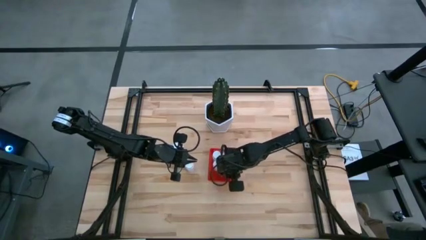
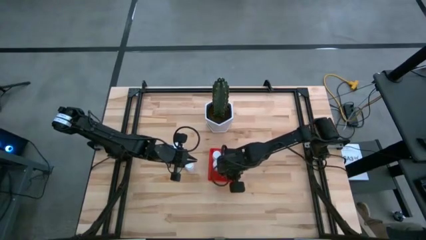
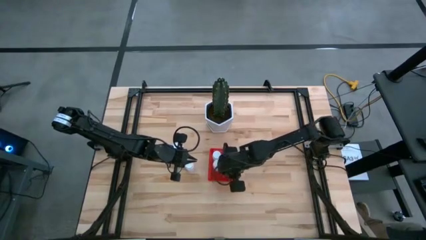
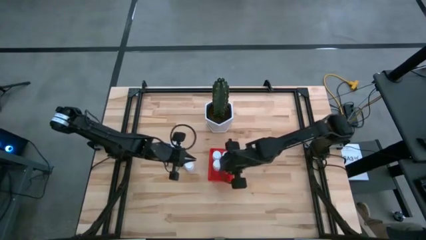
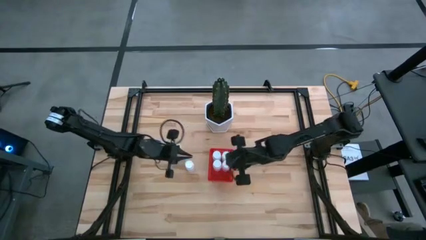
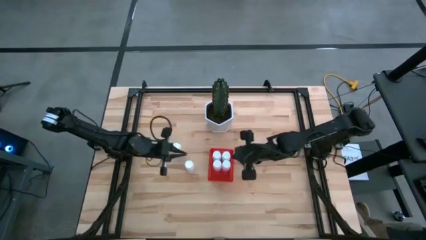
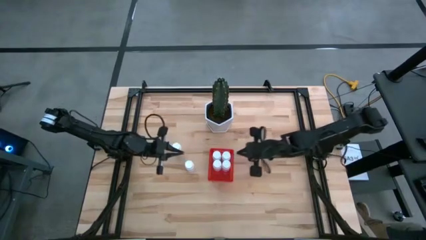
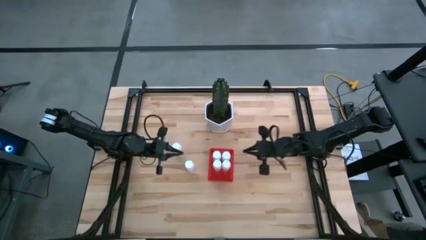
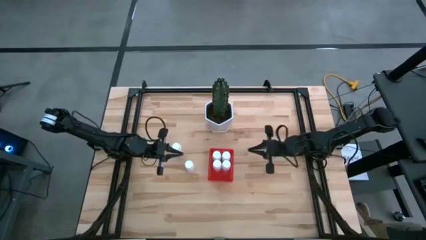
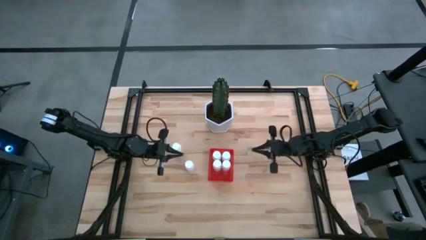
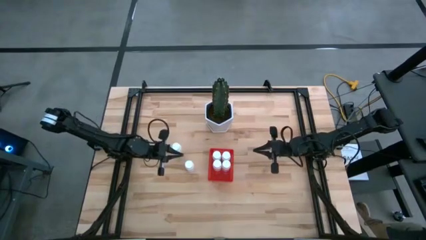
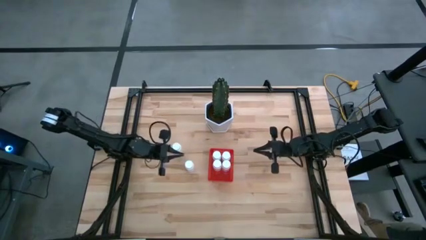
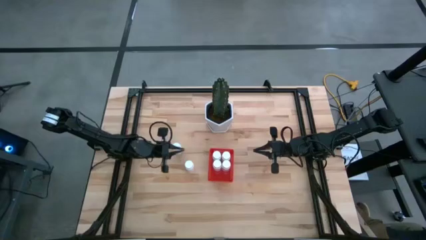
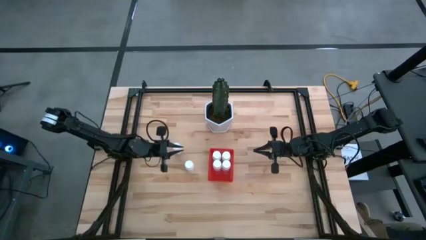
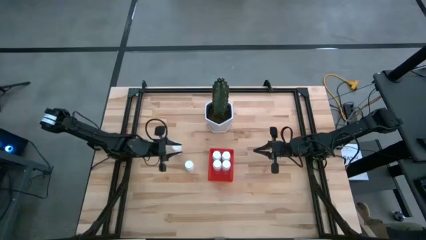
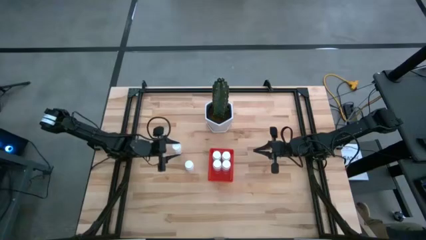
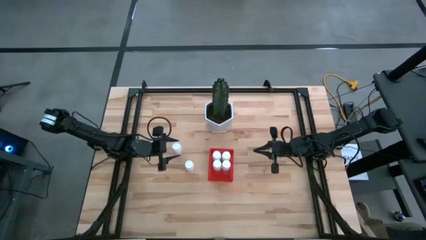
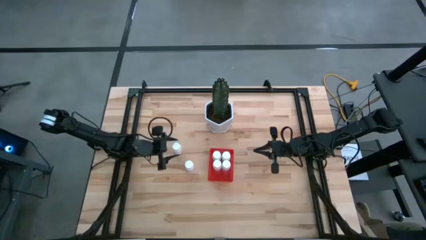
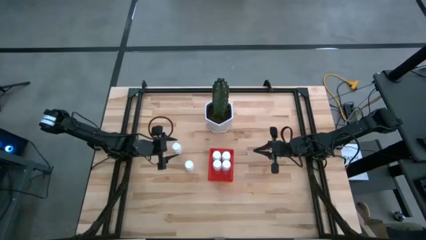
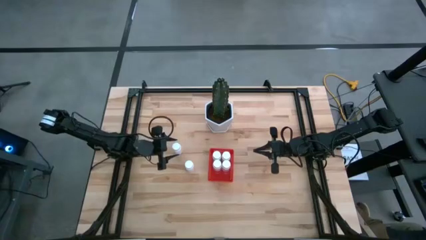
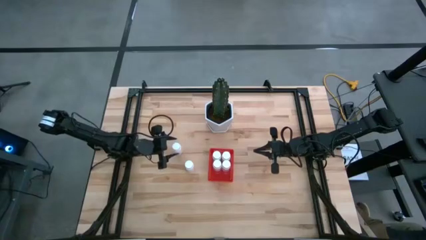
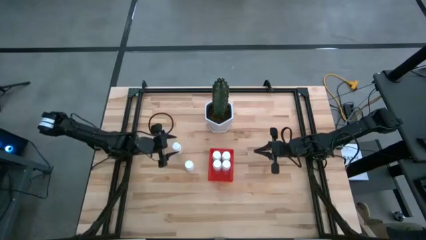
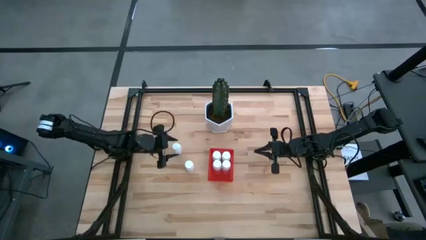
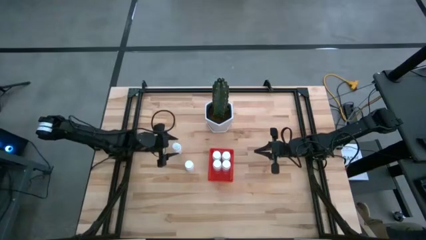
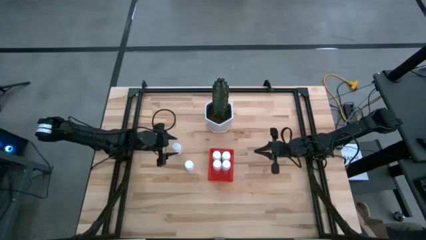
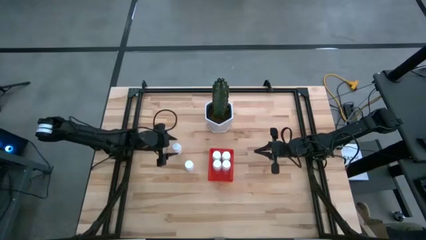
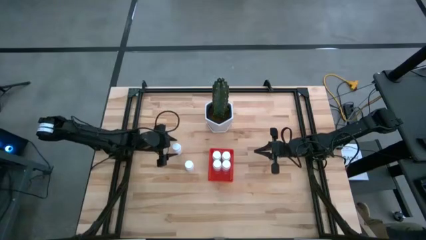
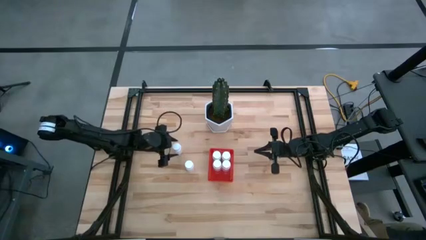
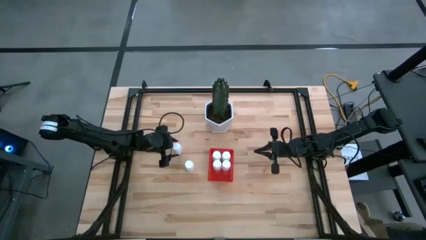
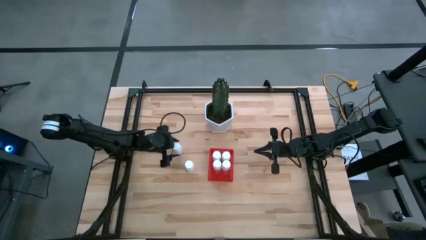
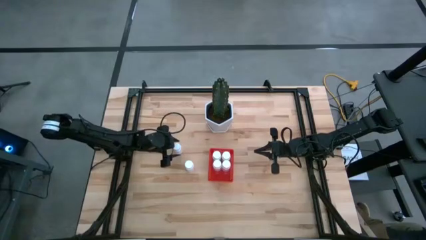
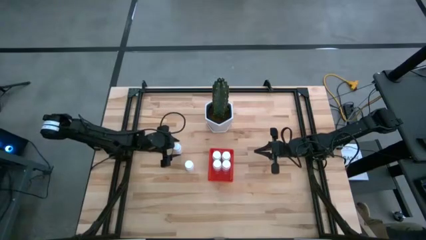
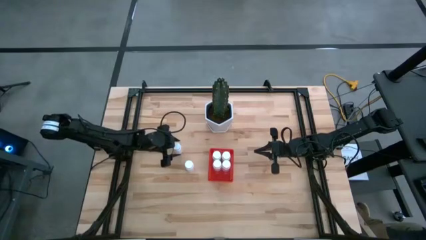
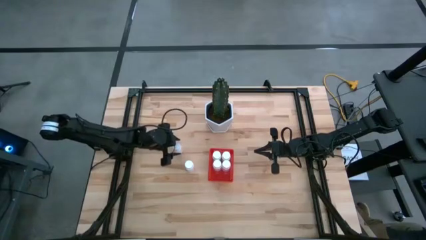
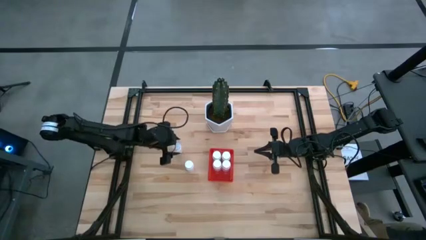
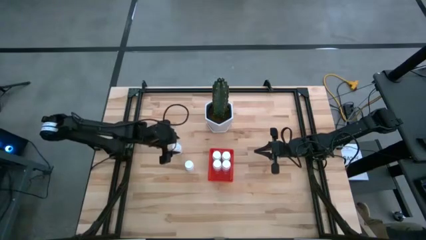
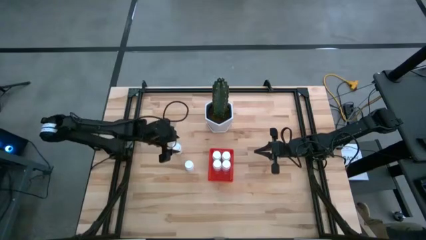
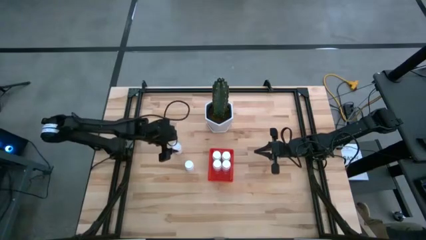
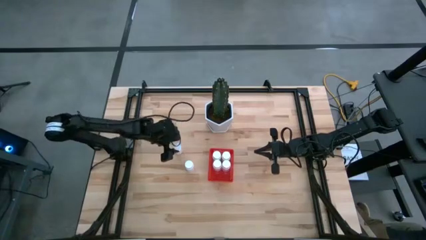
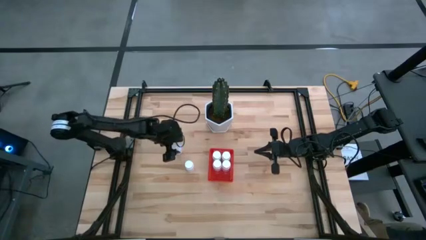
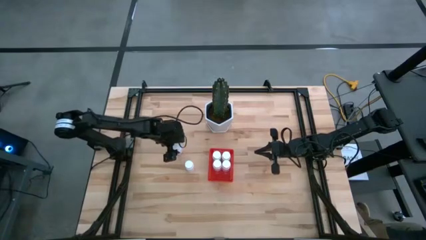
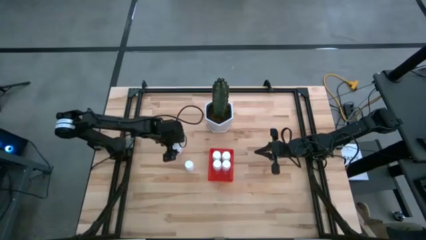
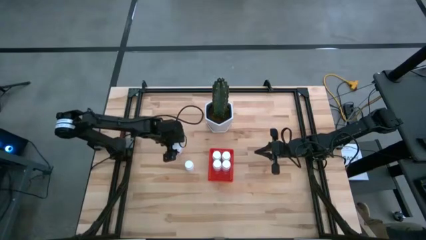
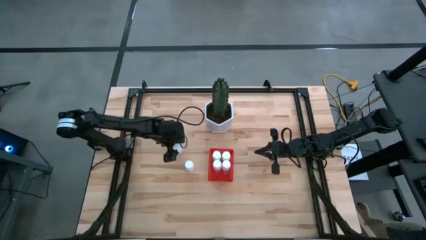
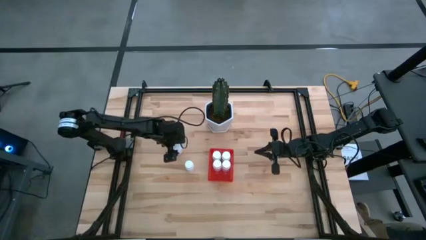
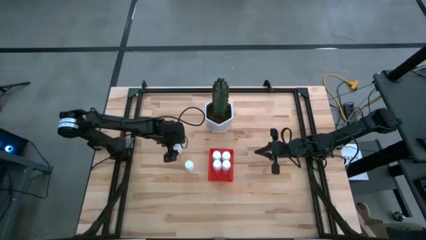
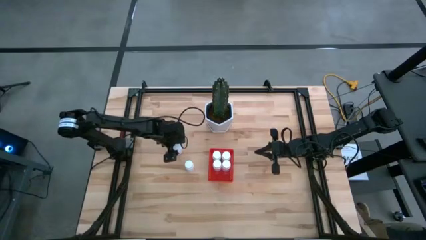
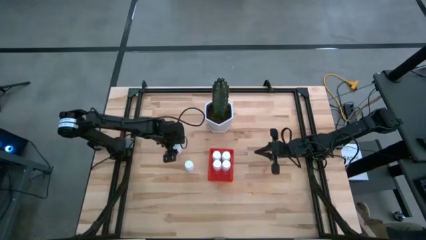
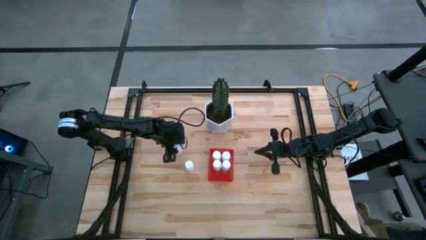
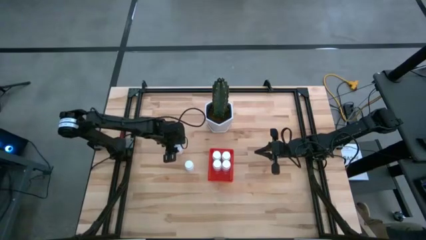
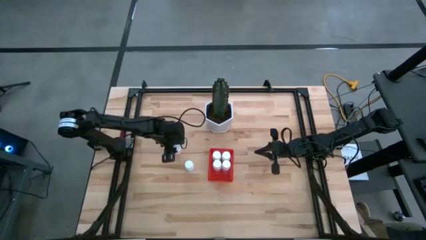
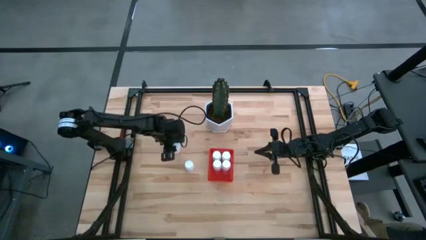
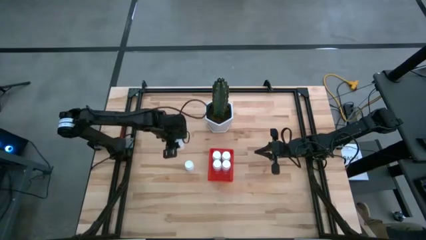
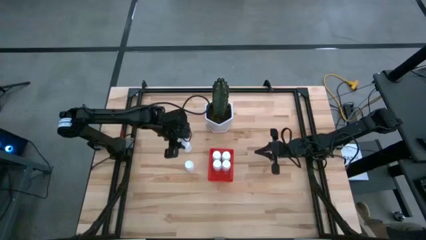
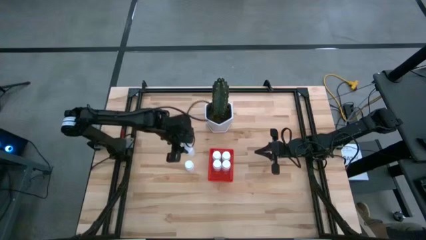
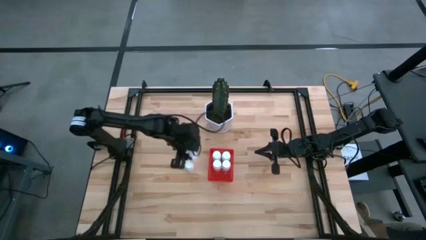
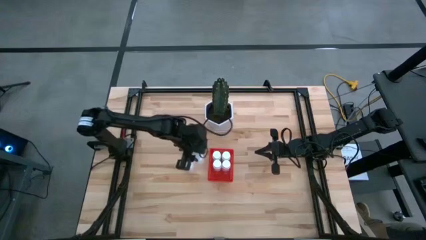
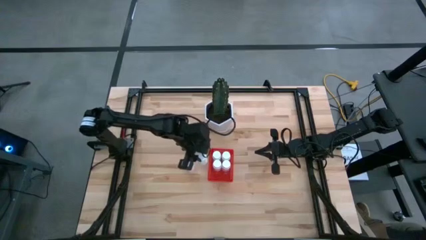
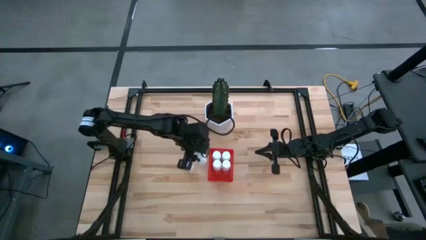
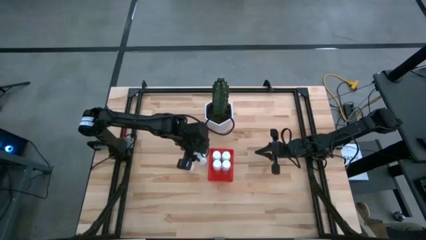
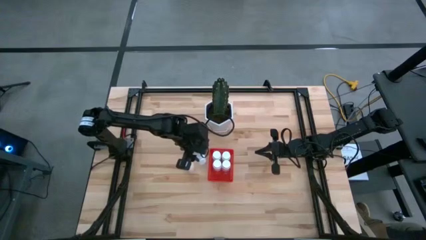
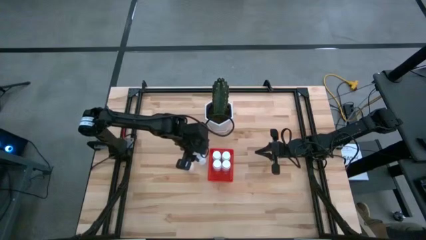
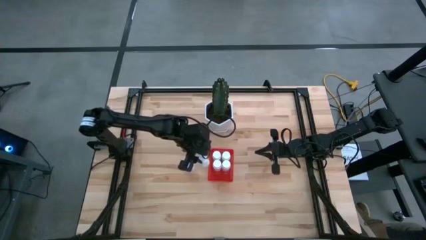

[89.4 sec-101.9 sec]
Task: Pick and place pill bottles into a basket
Put the white pill bottle into the red bin

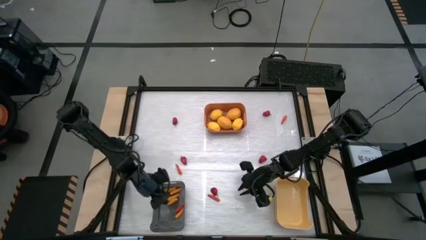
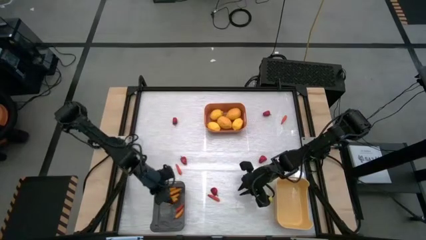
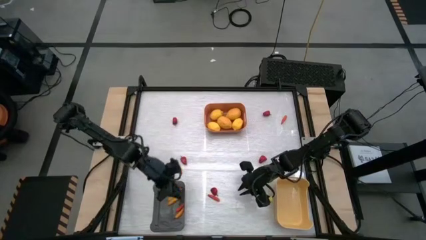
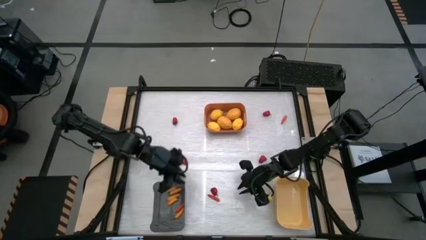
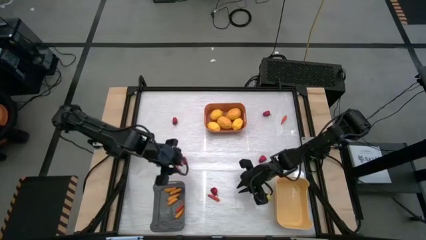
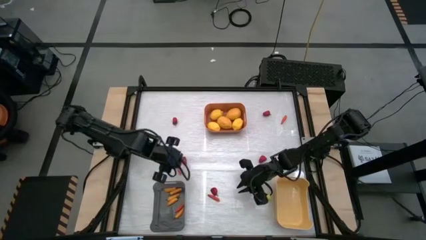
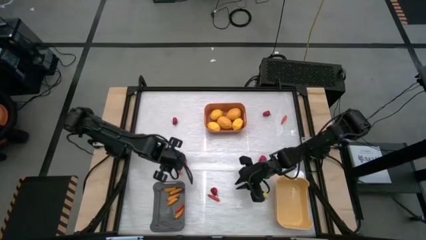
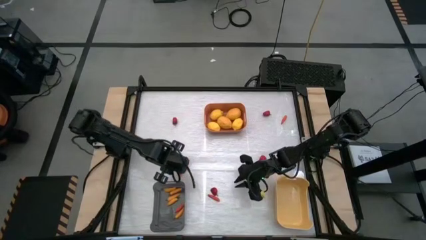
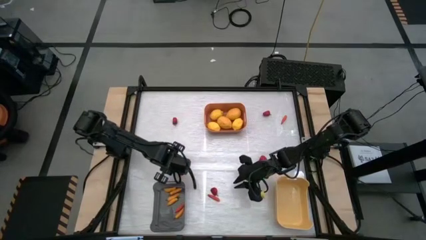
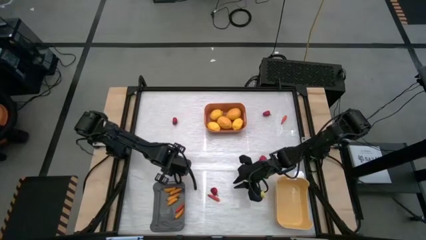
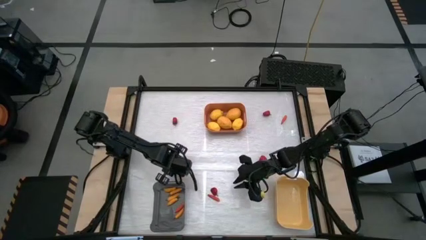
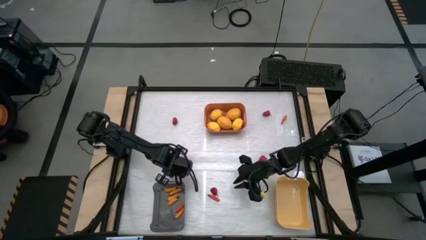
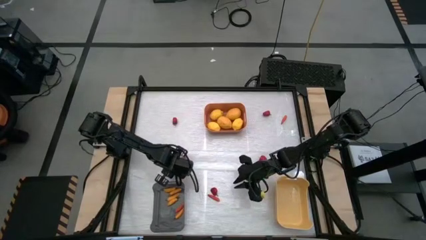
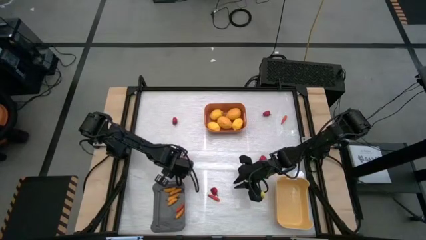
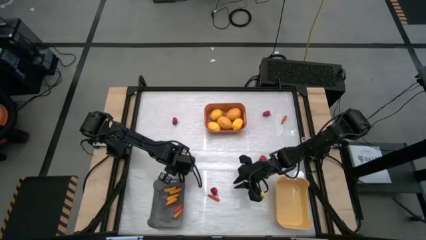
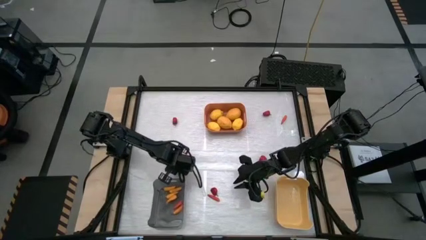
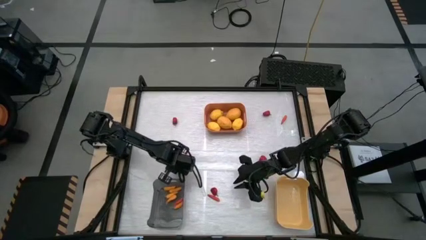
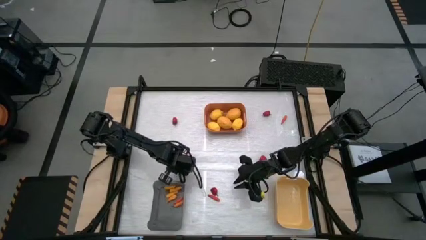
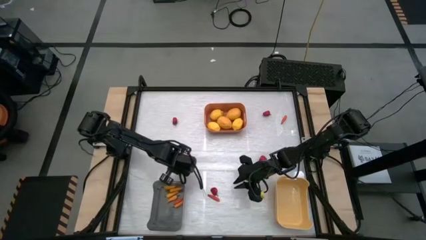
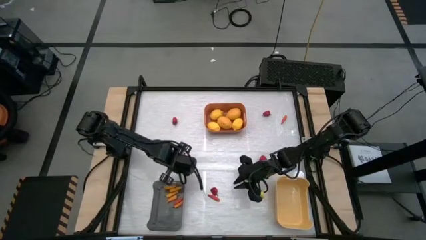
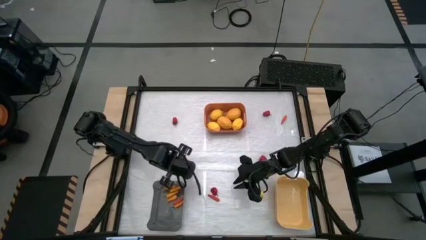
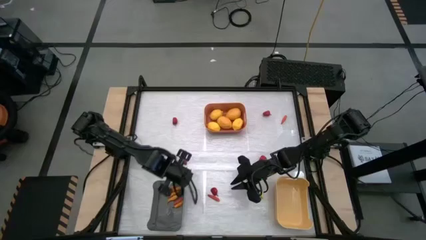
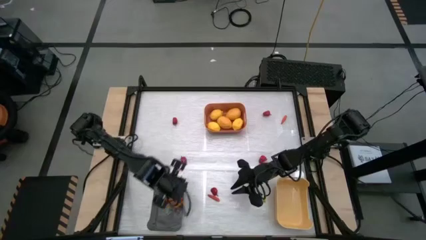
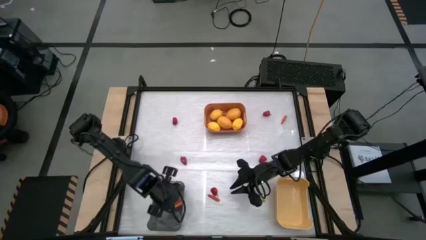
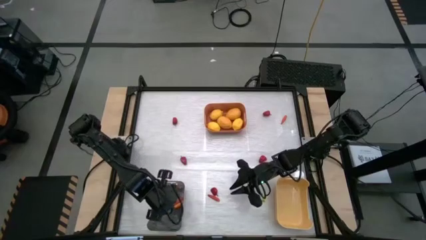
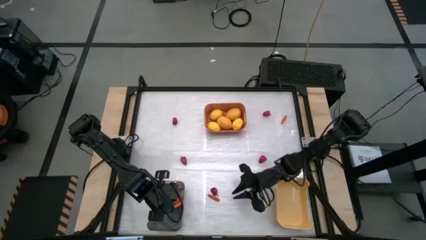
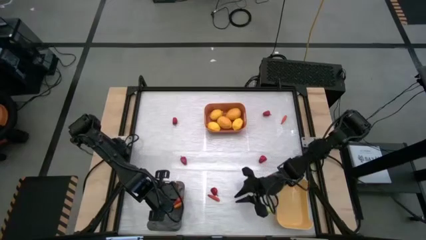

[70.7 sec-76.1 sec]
Task: Sort produce into baskets
Put the orange chili pepper into the black bin
